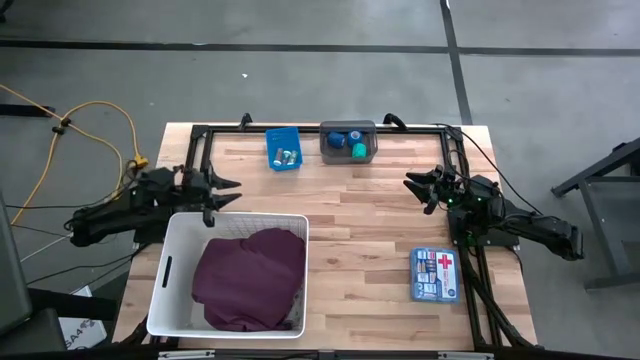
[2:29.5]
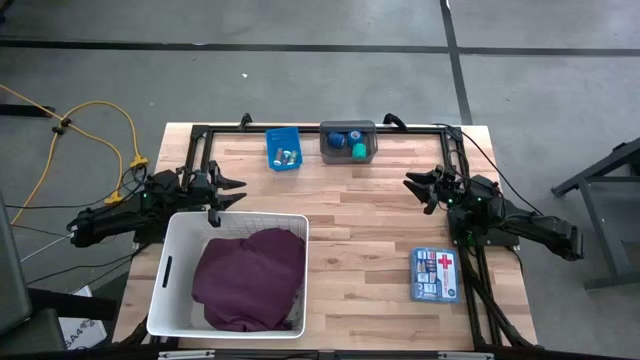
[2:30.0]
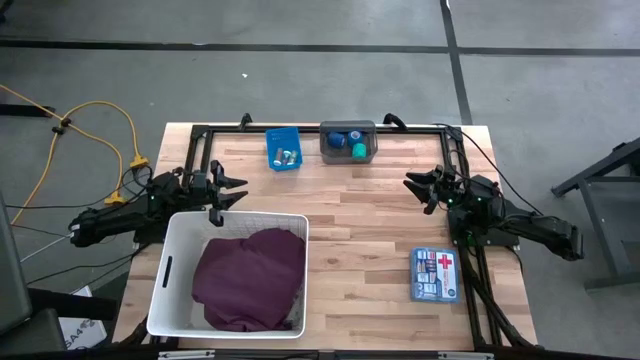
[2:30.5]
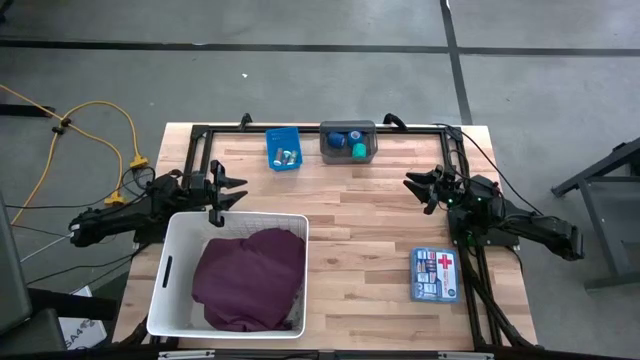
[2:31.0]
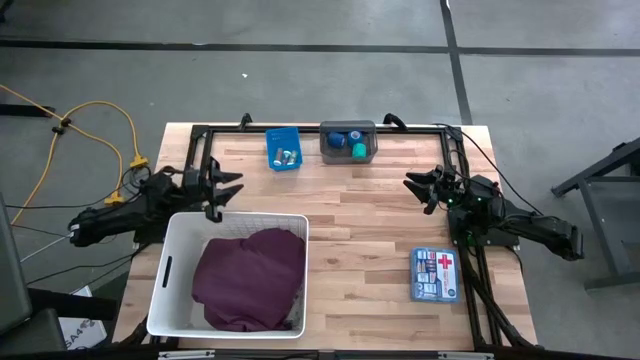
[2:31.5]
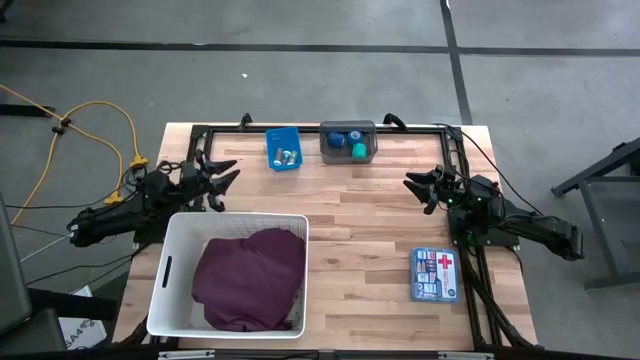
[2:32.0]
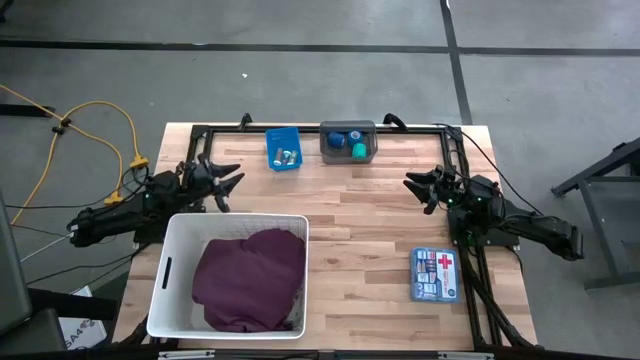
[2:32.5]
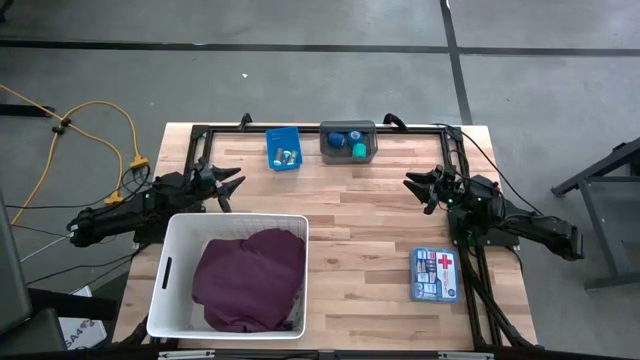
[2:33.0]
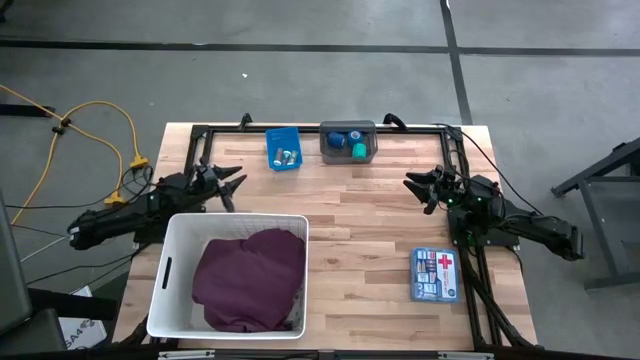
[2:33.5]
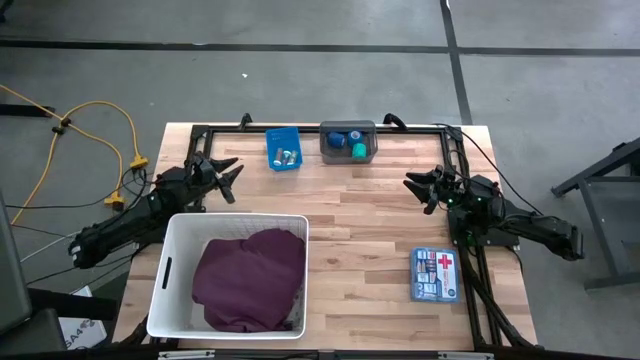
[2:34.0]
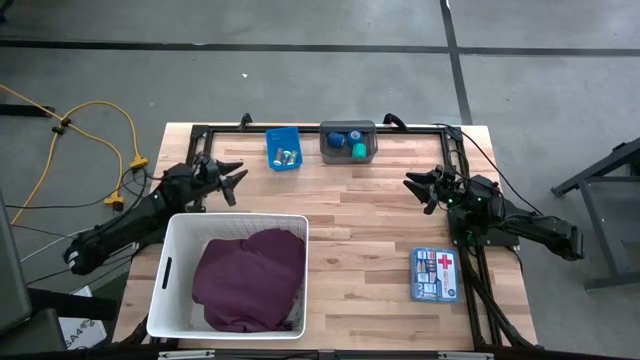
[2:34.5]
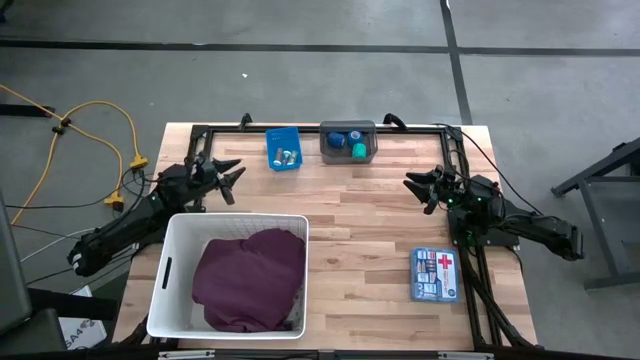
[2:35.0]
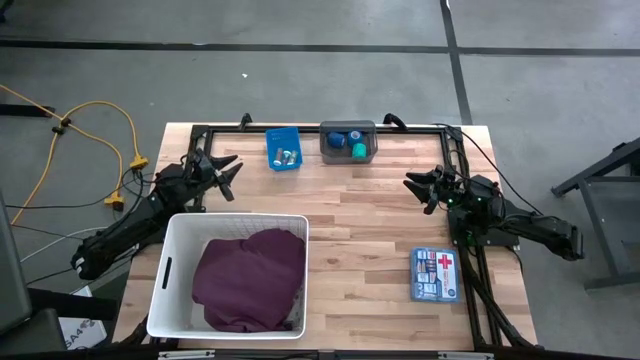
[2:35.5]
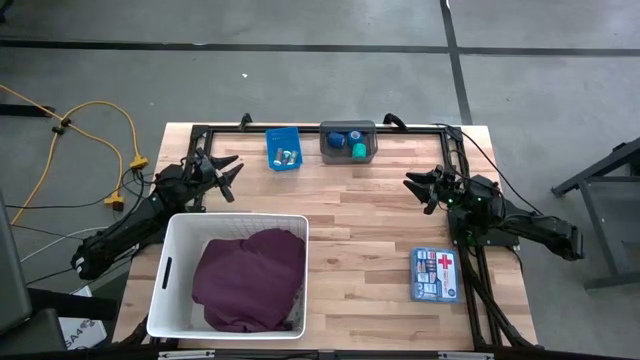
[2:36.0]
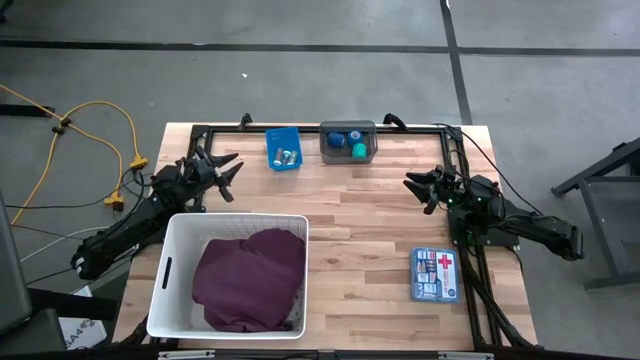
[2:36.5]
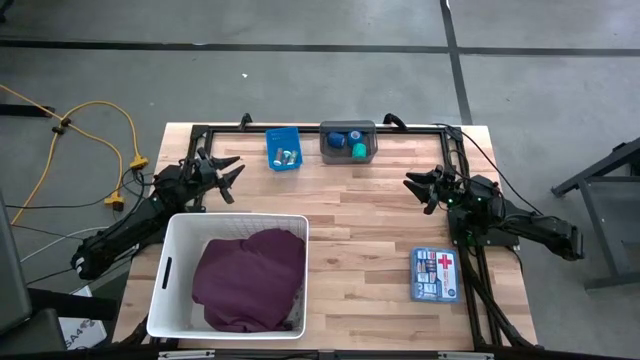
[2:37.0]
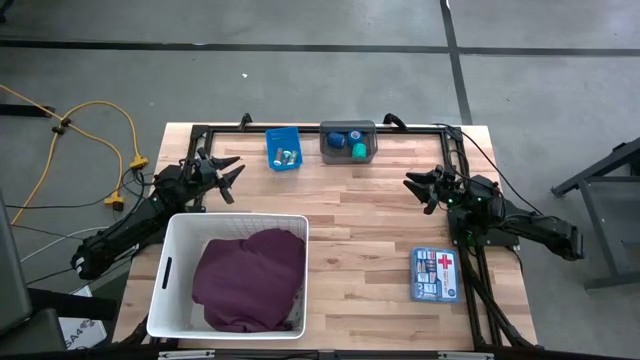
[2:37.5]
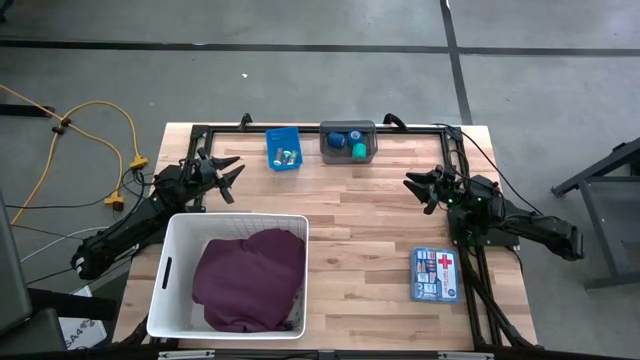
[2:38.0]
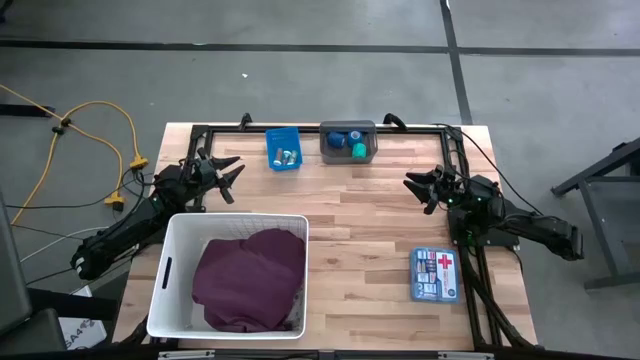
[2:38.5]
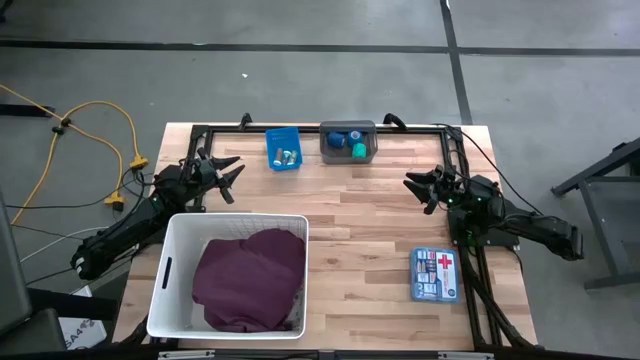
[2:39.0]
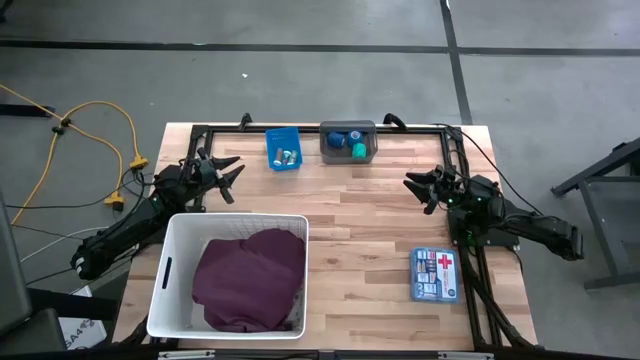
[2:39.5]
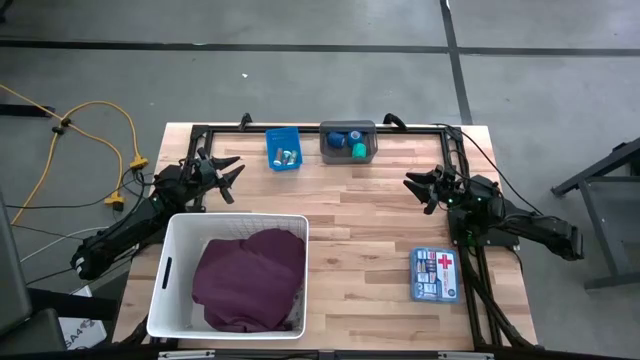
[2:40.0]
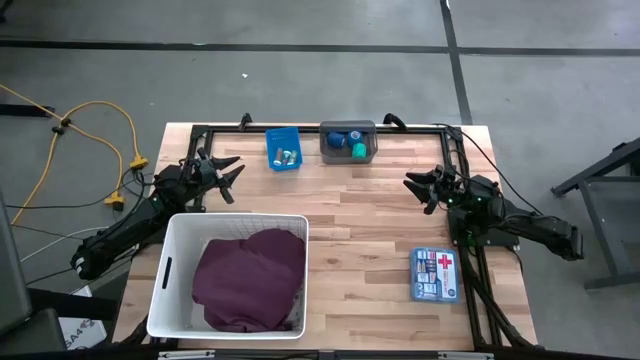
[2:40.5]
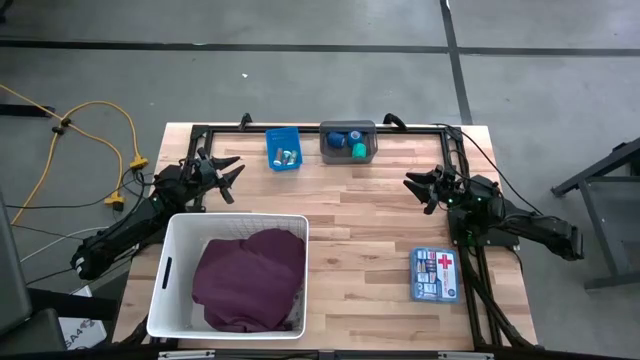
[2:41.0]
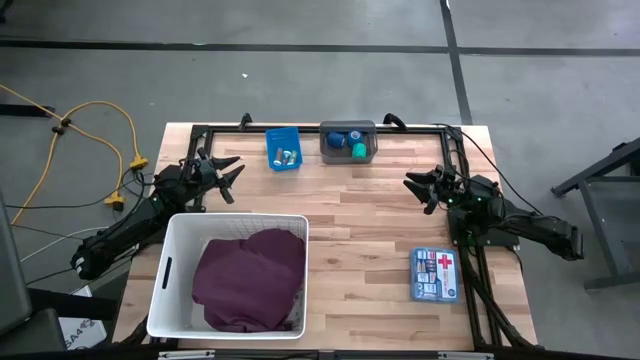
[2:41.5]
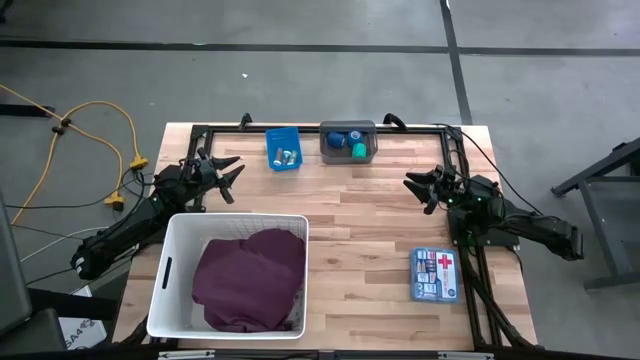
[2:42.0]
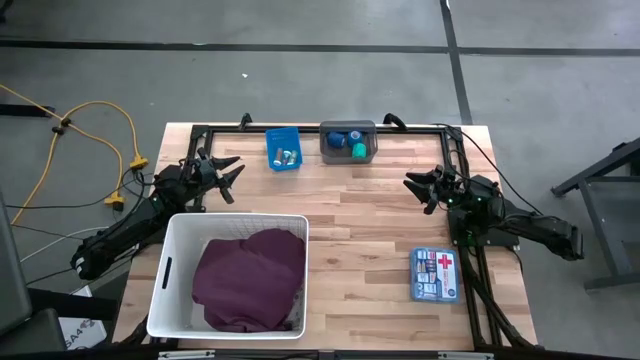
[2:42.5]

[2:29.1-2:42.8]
Task: Pick & place medical supplies in basket/bin
Return to Home Position

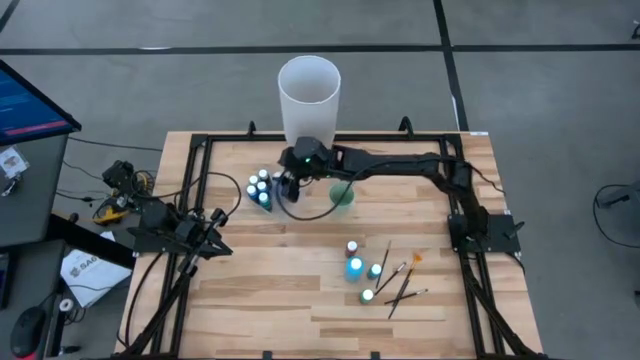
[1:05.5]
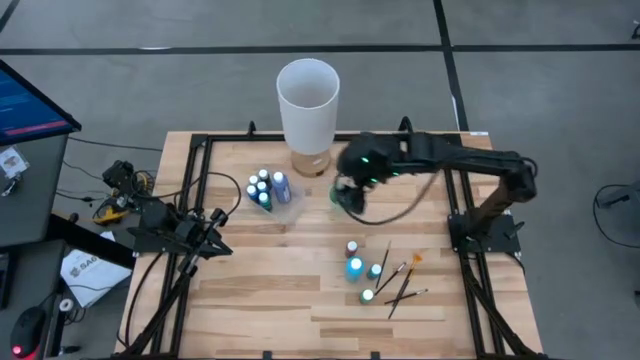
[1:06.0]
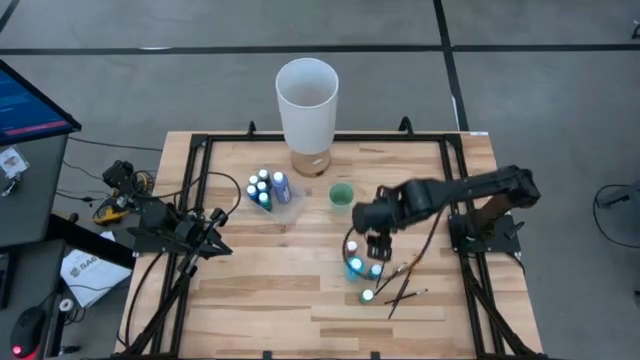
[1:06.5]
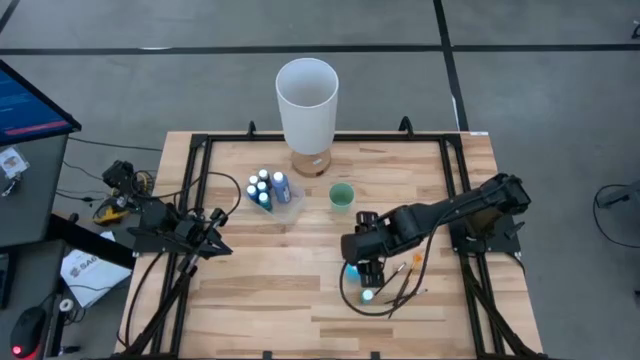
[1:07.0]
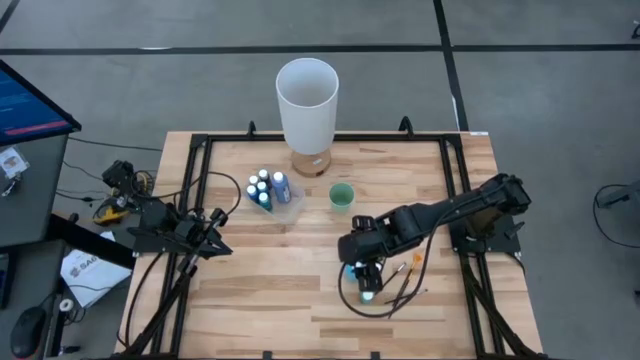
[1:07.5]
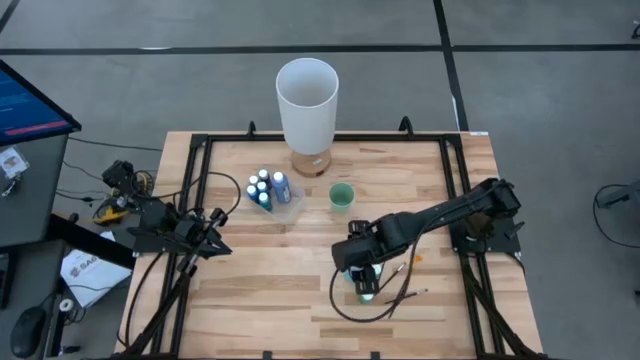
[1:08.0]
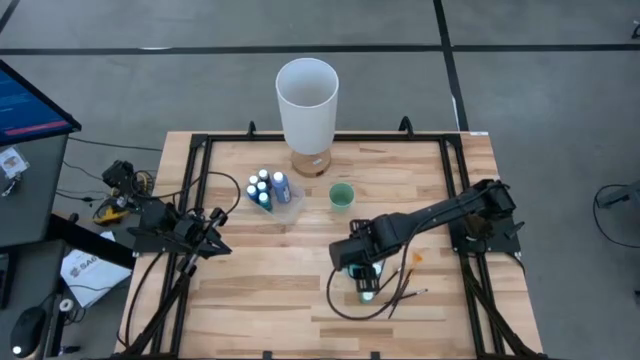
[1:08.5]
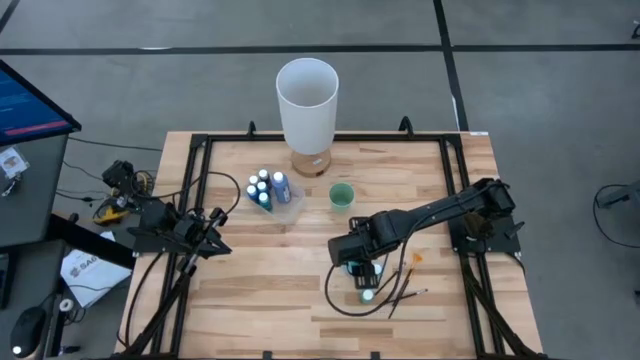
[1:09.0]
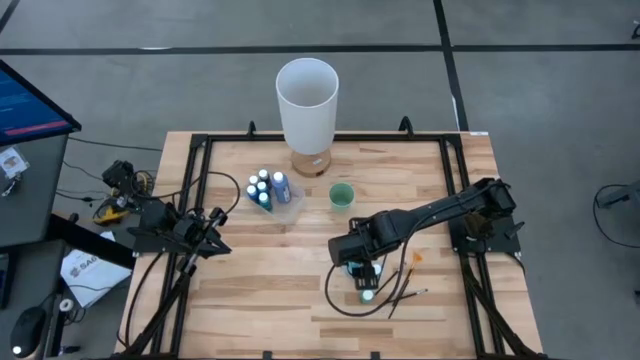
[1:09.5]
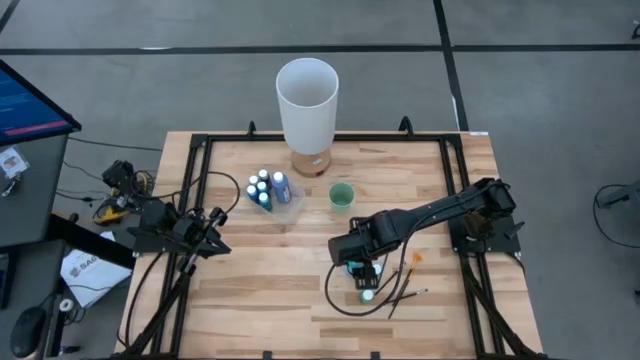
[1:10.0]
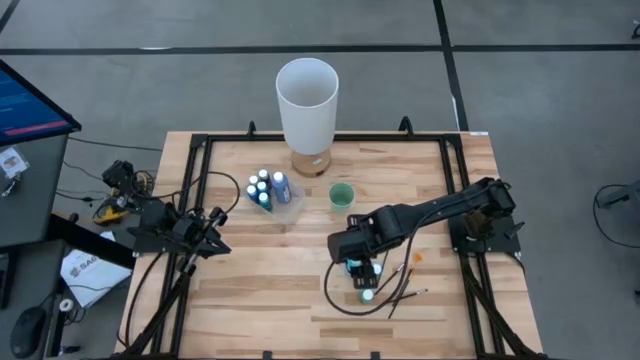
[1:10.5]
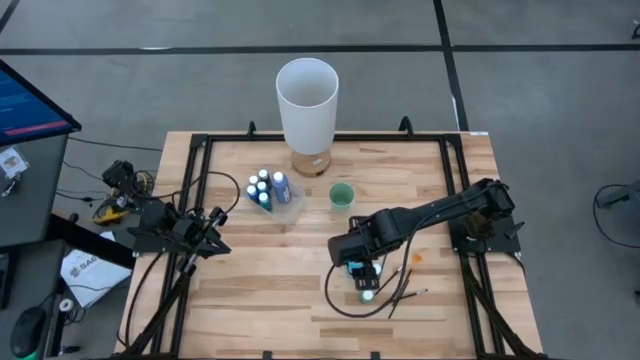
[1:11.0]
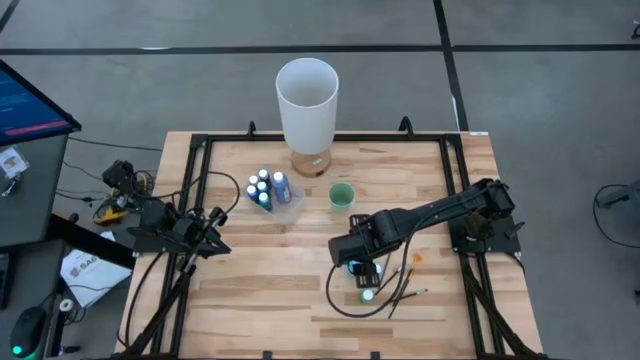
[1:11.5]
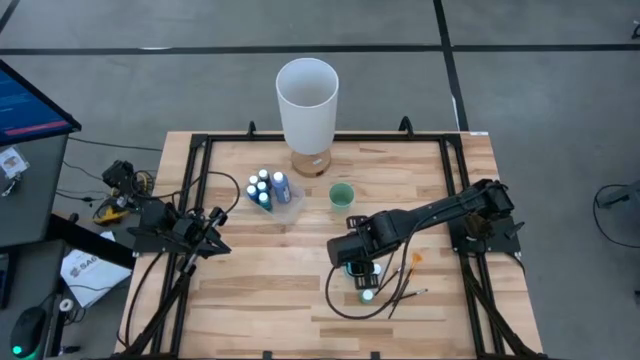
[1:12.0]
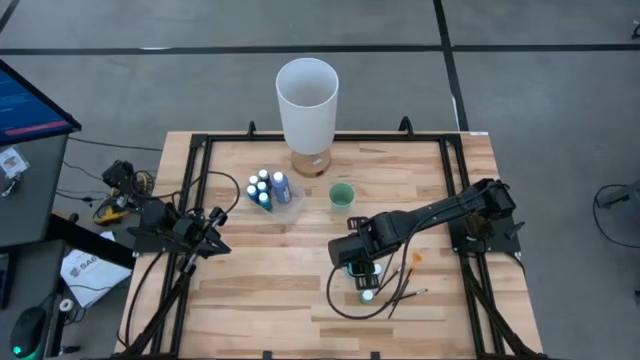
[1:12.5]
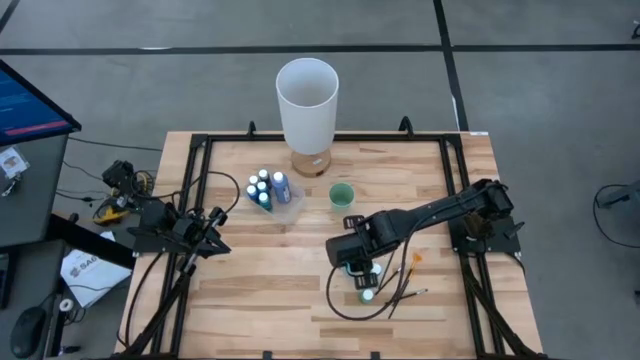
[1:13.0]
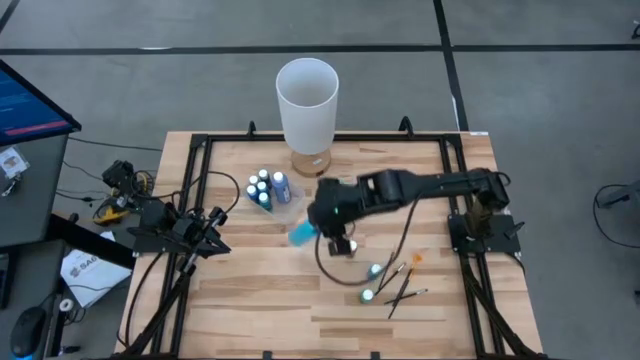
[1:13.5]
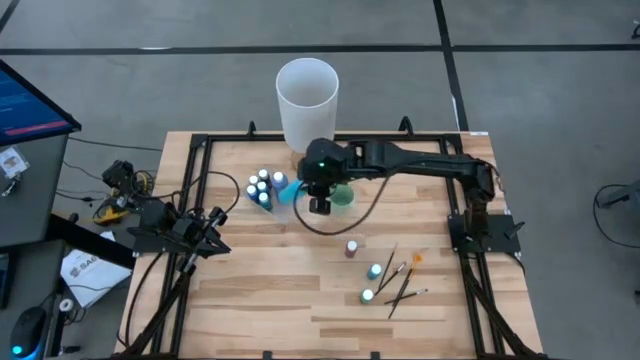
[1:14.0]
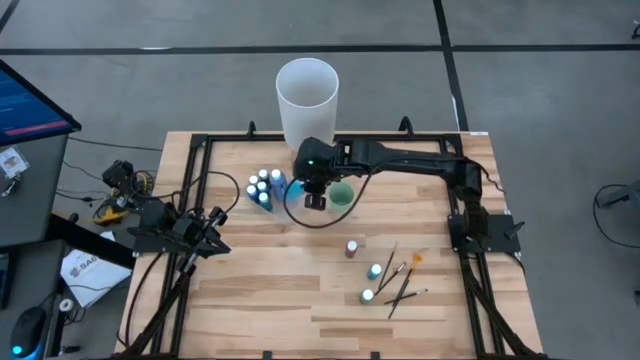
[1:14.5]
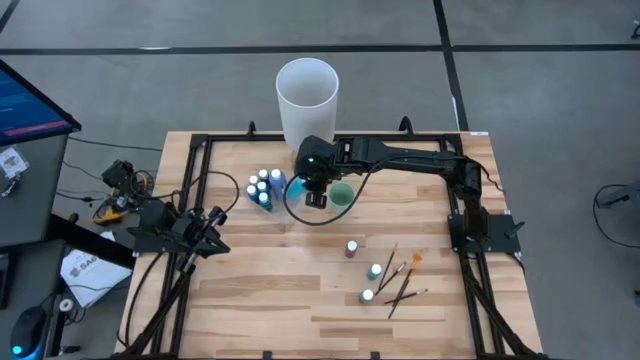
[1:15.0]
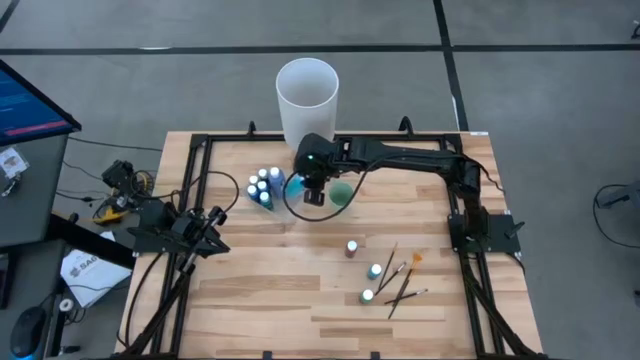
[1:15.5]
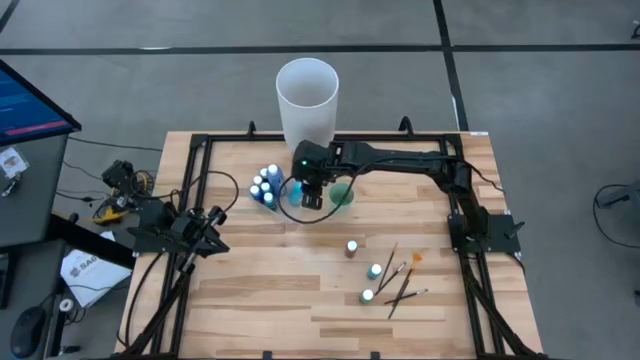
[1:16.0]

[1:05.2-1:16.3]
Task: Pick & Place Paint Supplies
Put the left light blue paint bottle into the transparent bin
